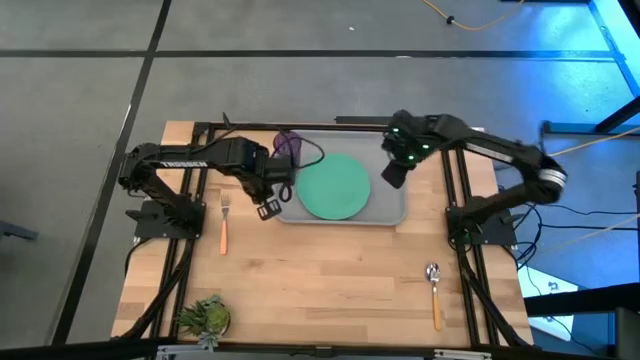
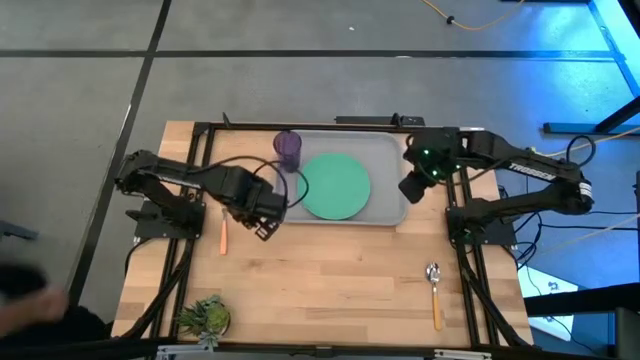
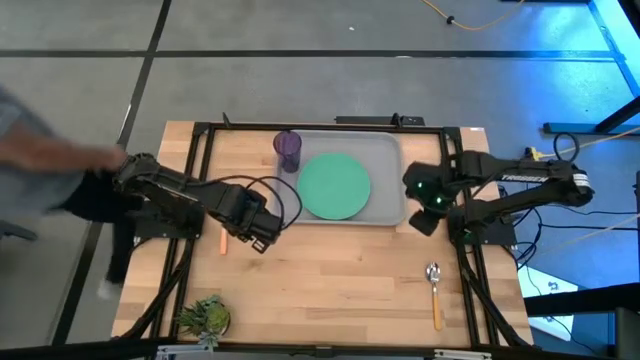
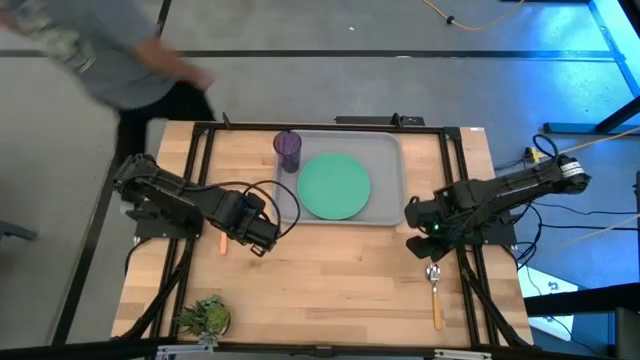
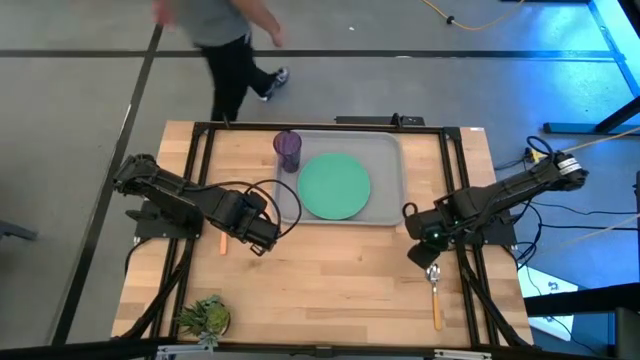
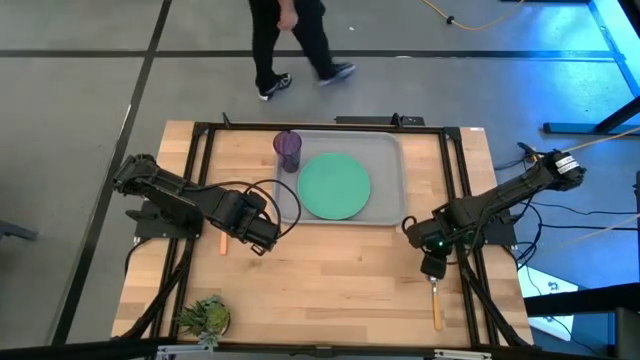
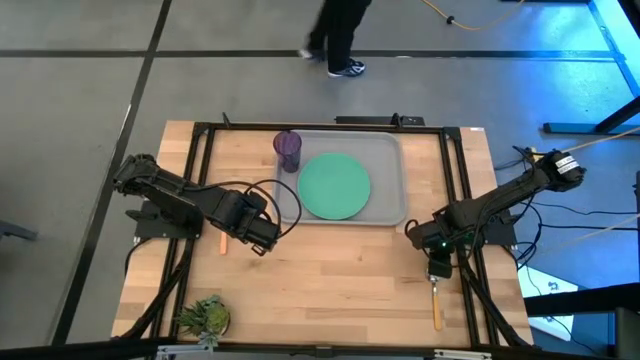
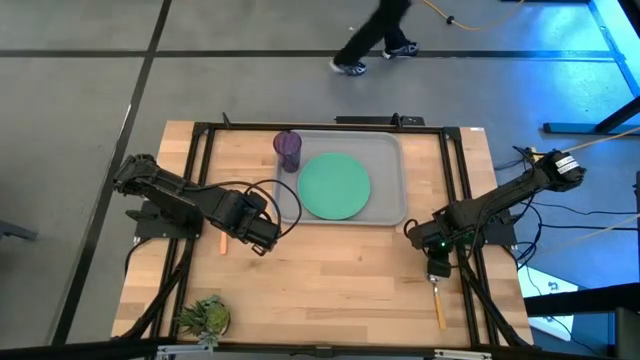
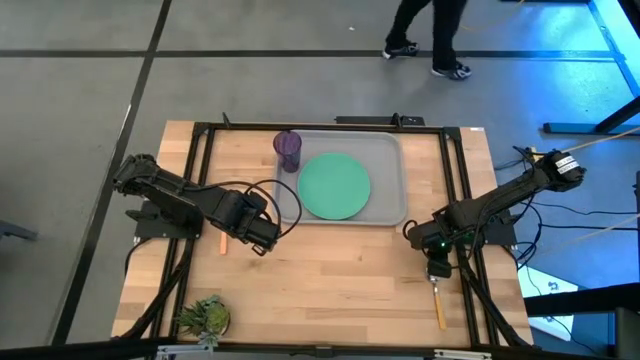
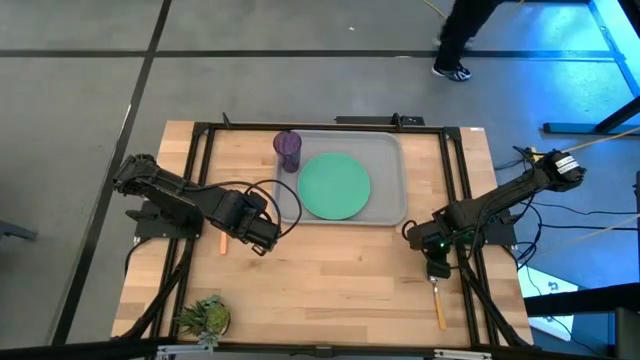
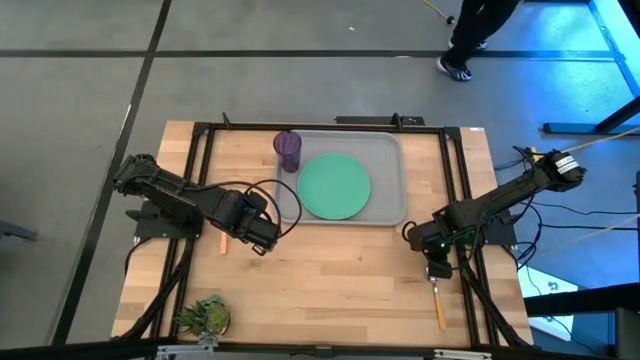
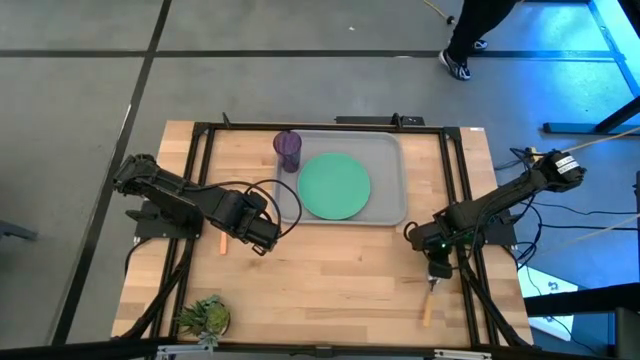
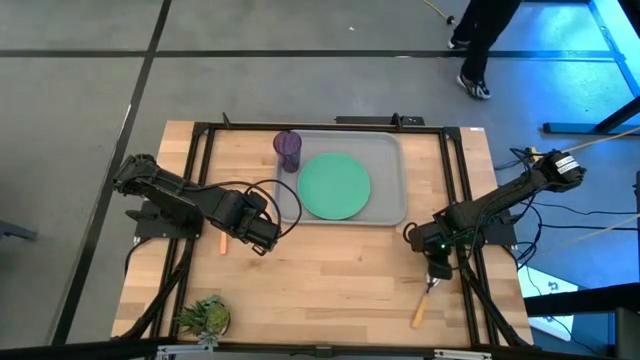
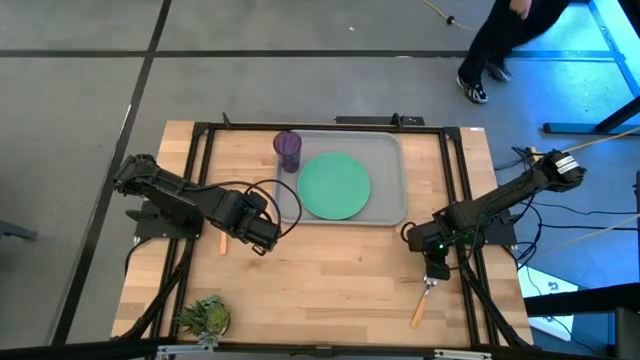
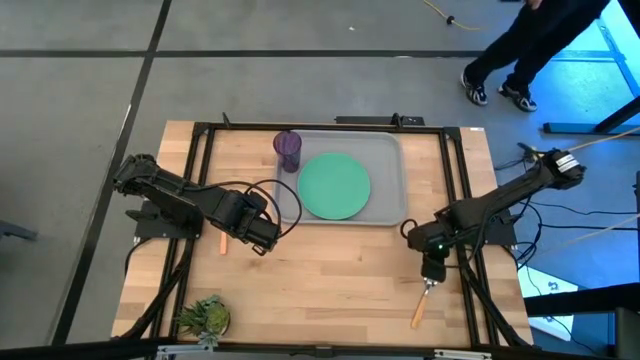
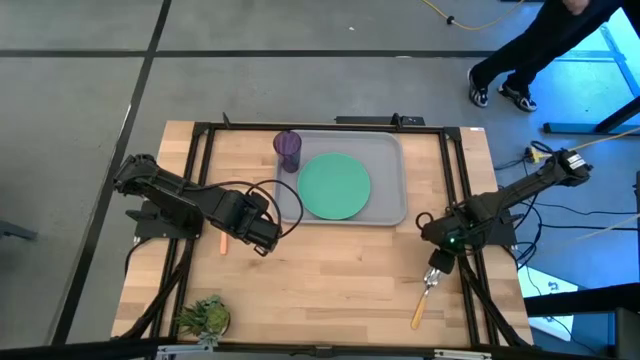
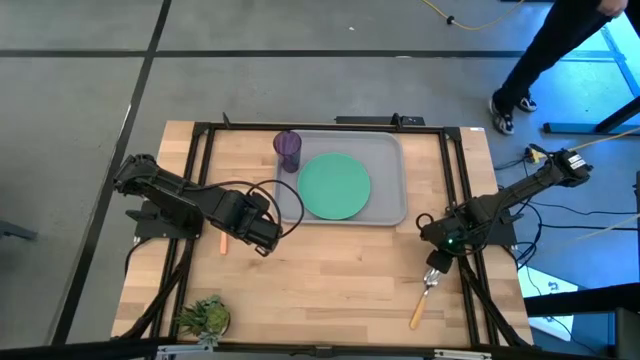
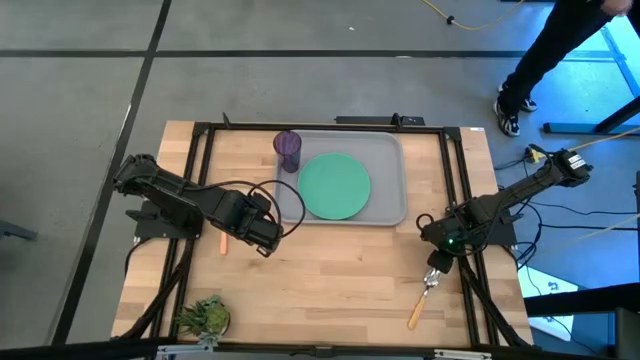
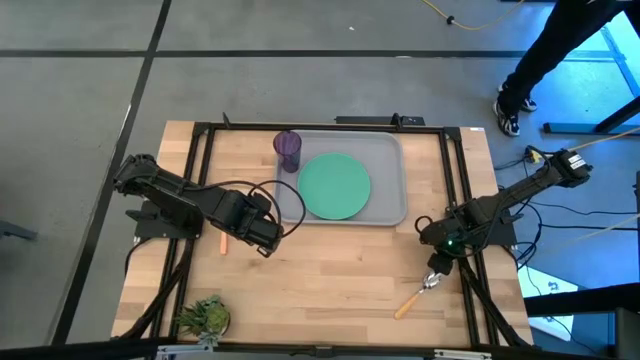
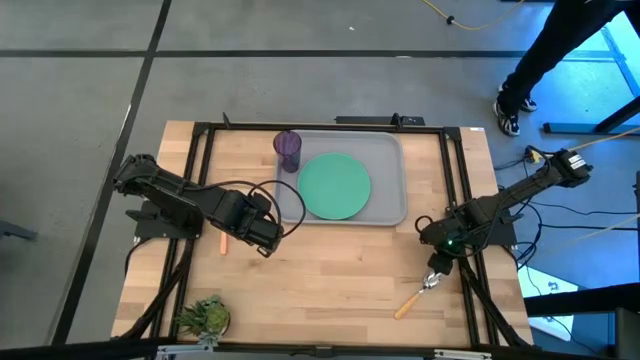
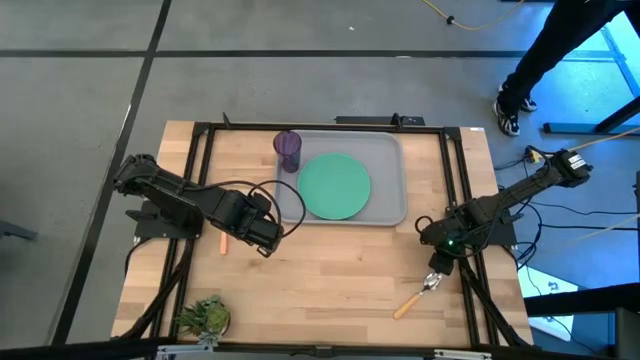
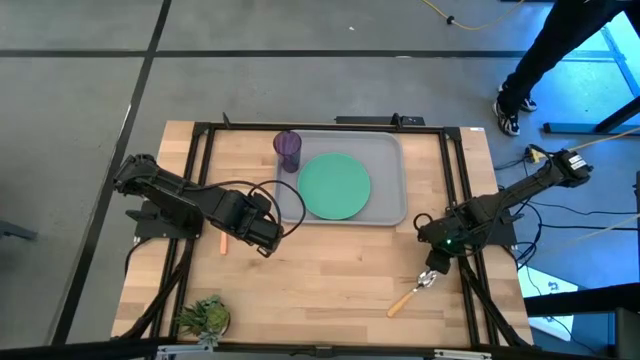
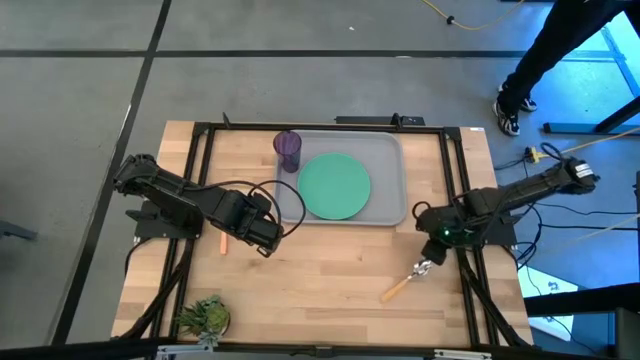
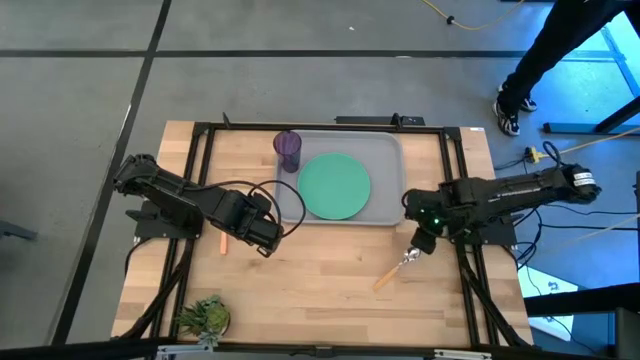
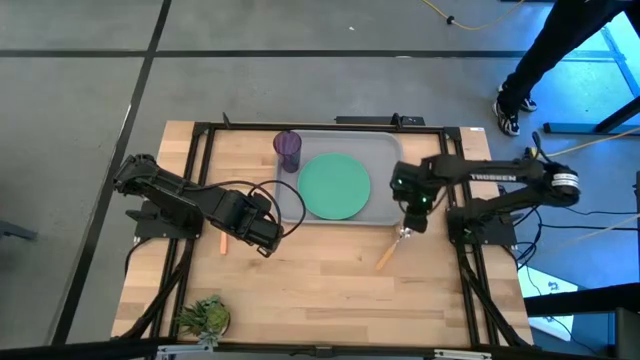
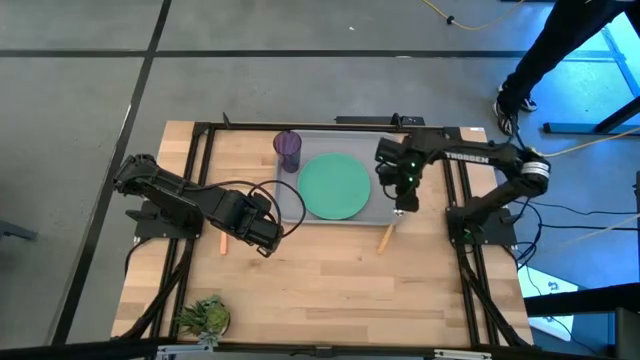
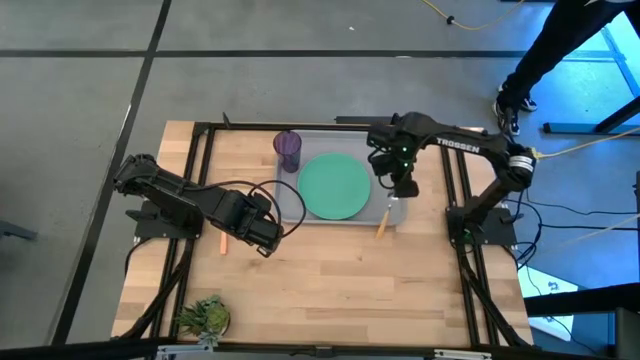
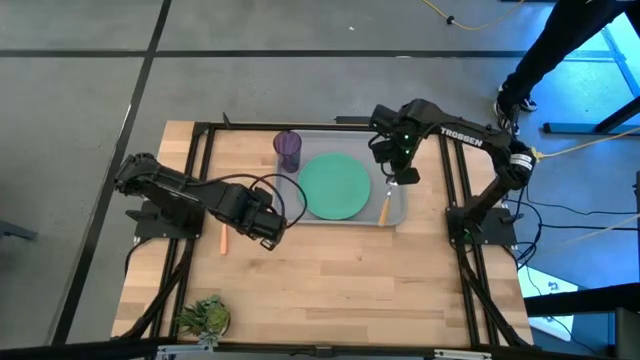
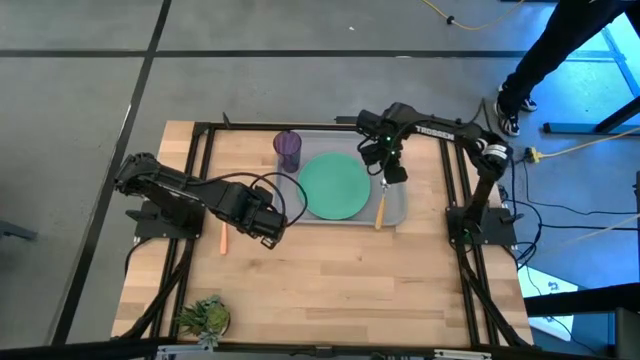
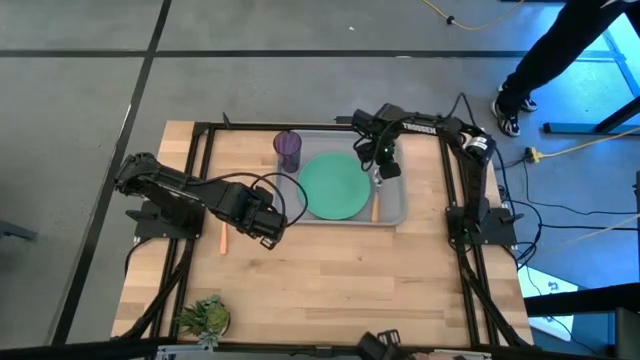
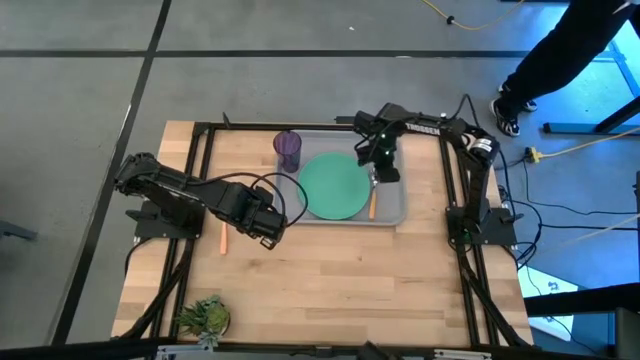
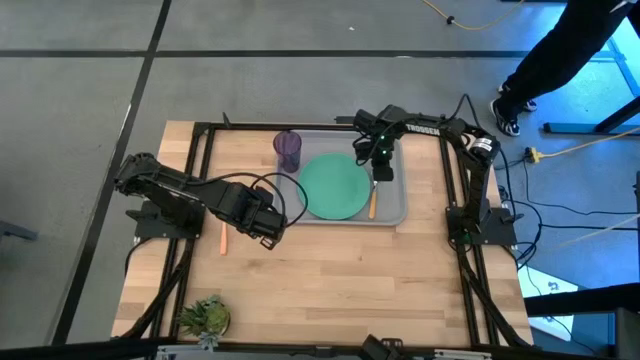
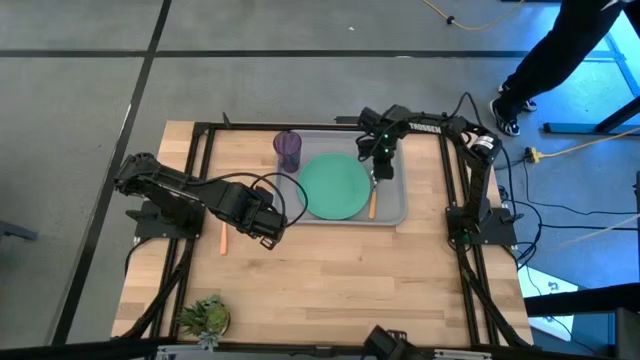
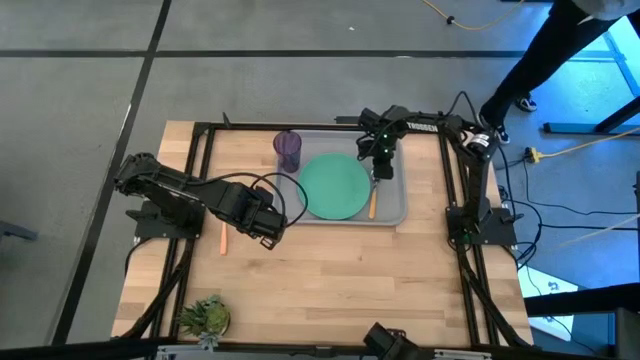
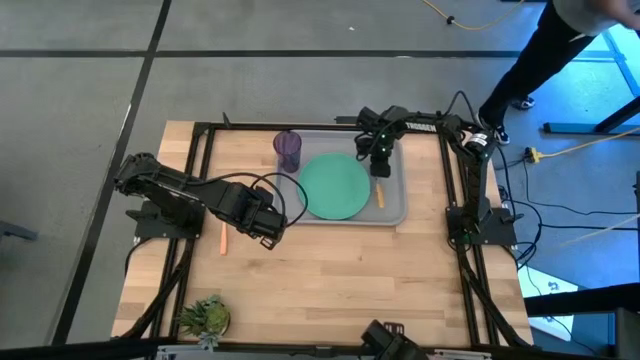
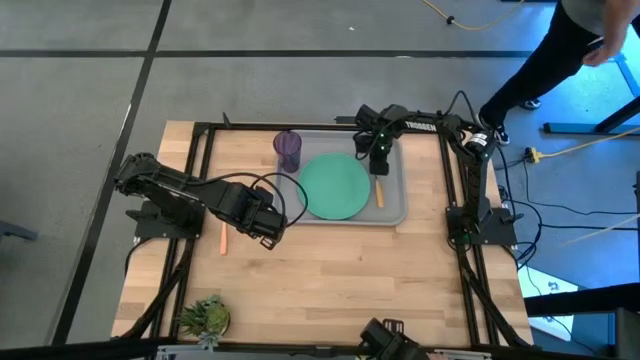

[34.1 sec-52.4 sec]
Task: Pick and place plate/cup/fork/spoon on tray
Put the yellow spoon on the gray tray to the right of the green plate

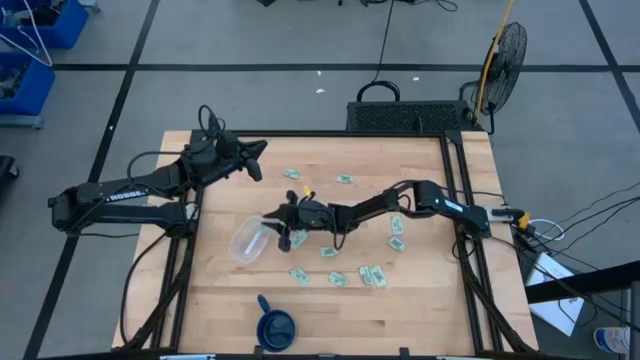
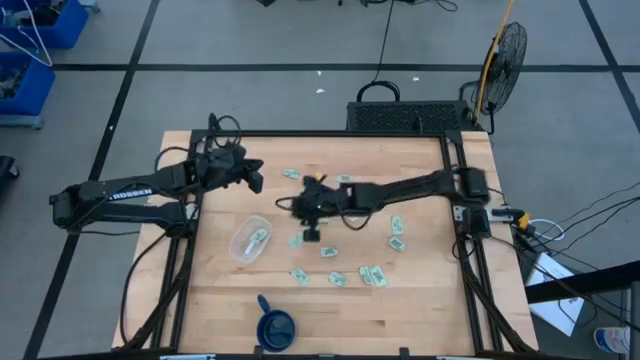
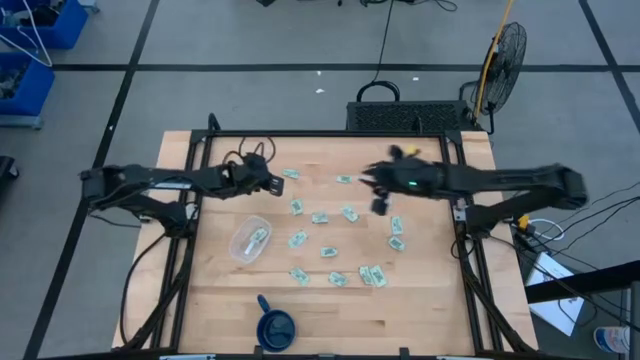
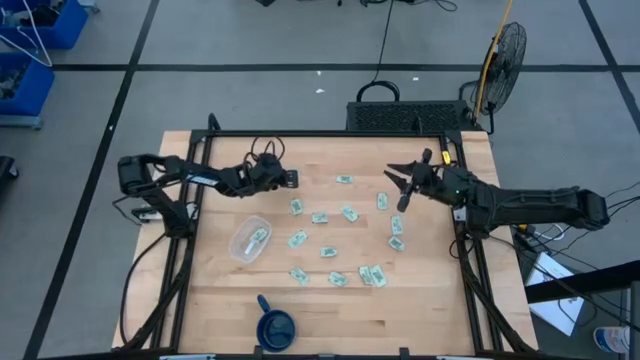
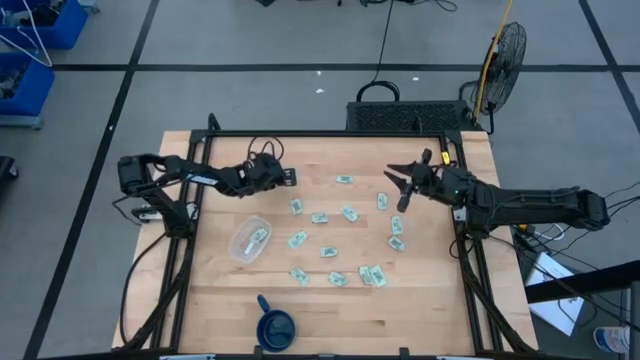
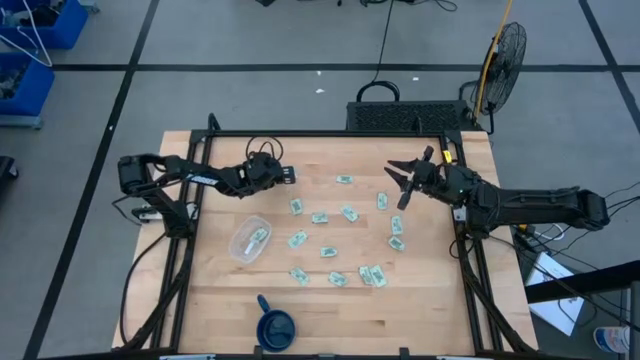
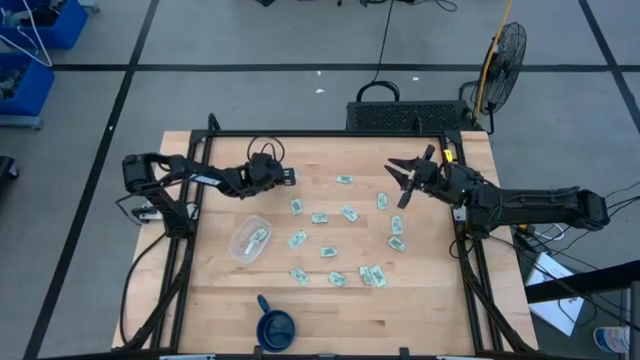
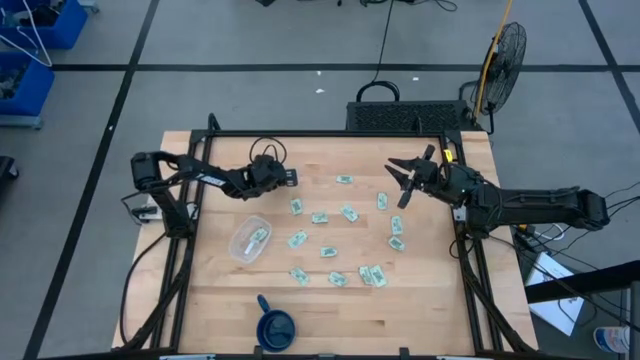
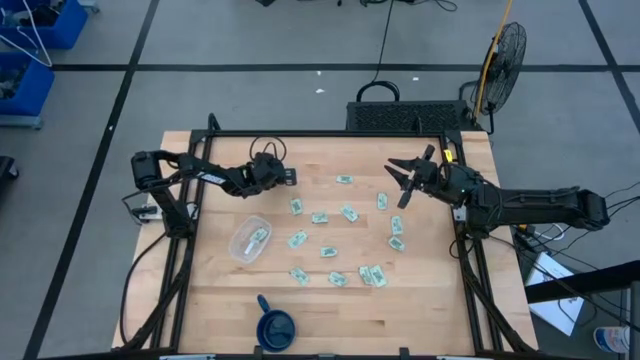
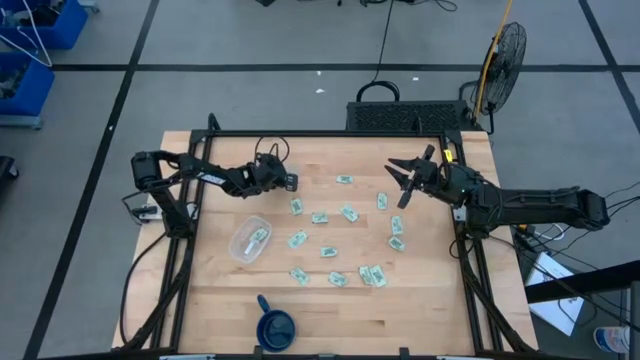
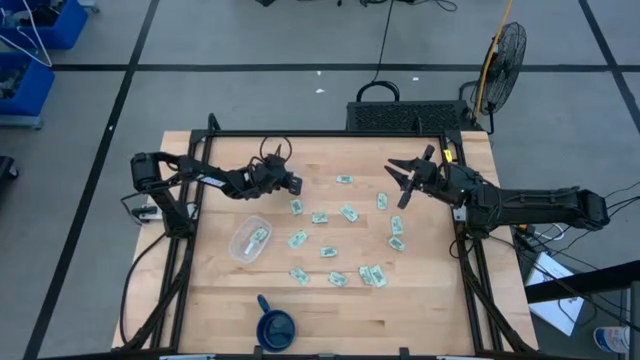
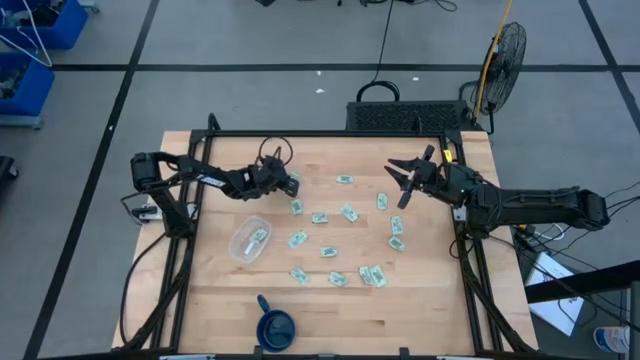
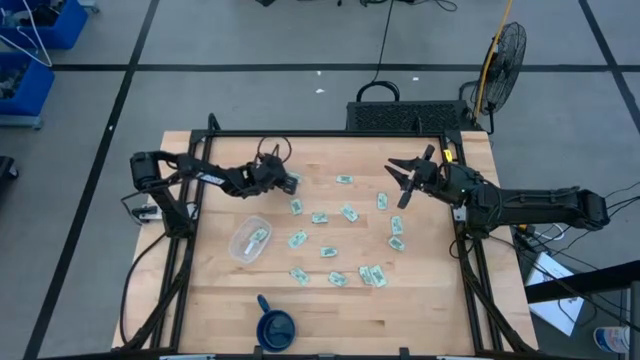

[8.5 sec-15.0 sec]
Task: Pick and place Stevia / Truvia into bins
Put the stevia packet into the transparent container
